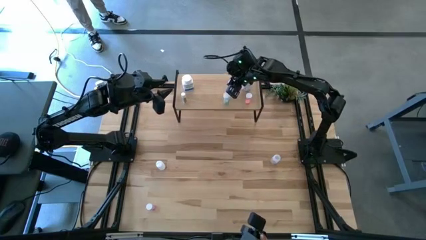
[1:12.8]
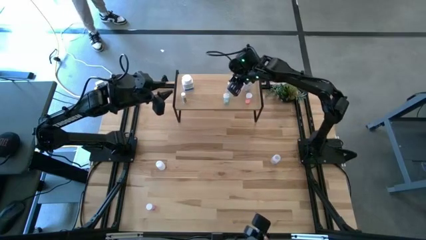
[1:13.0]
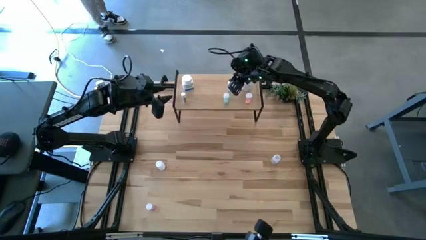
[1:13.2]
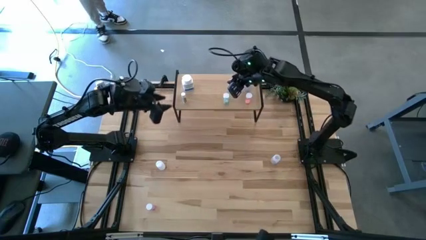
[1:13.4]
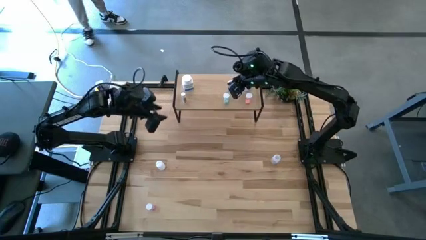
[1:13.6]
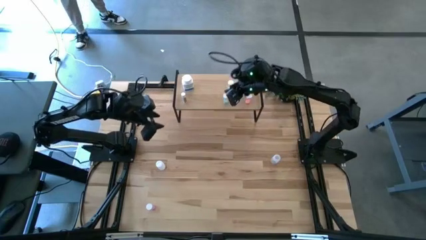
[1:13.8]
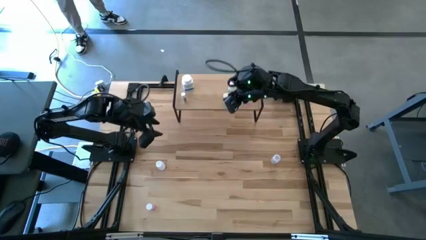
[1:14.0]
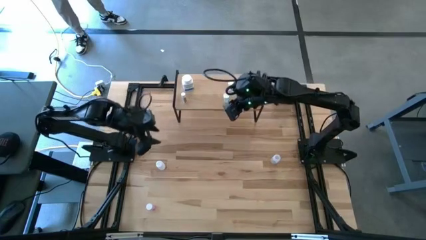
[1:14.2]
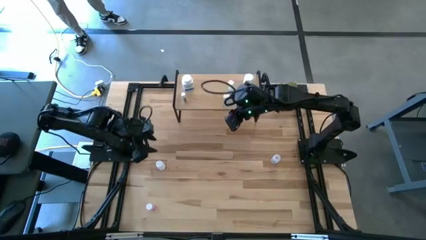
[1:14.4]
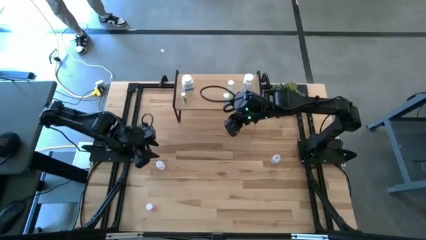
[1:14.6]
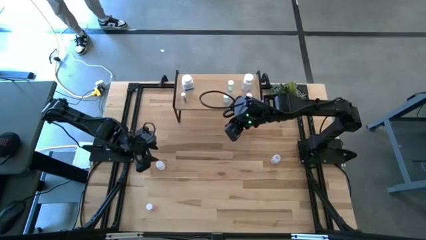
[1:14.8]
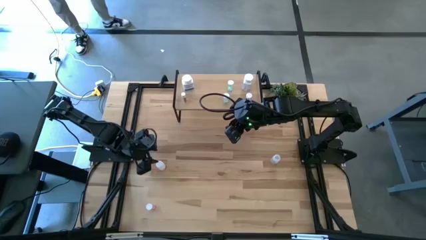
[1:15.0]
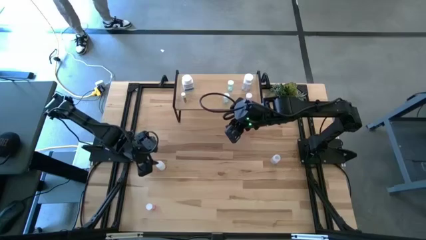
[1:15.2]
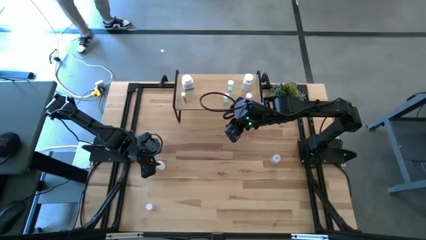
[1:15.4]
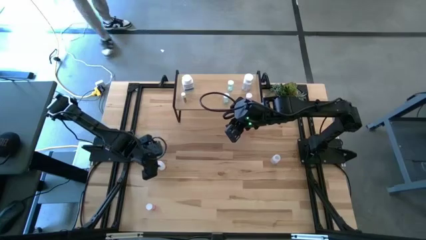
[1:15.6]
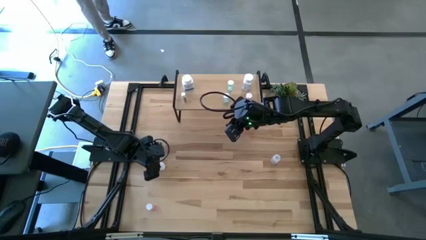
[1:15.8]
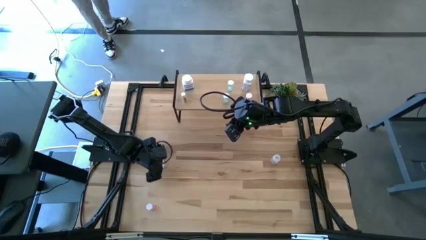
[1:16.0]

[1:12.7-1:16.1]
Task: Pick and place medicine bottles onto shelf by color
Put the white pill bottle on the shelf

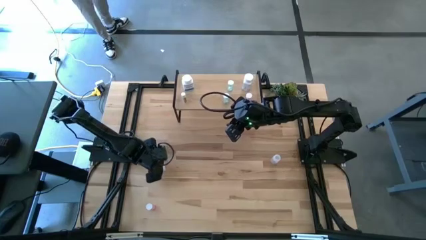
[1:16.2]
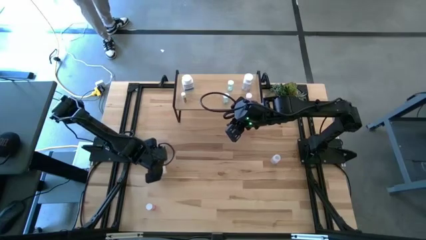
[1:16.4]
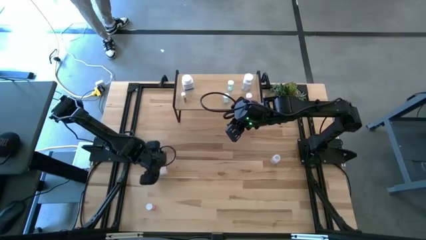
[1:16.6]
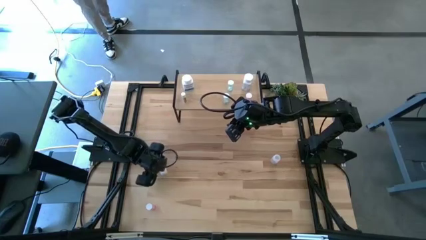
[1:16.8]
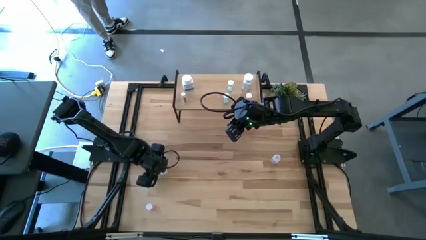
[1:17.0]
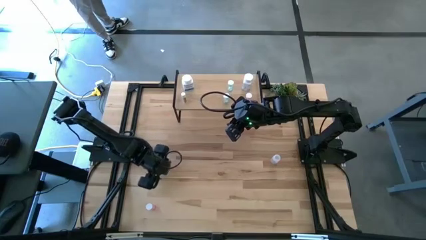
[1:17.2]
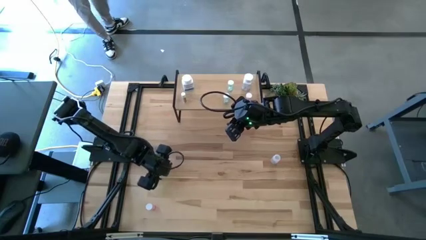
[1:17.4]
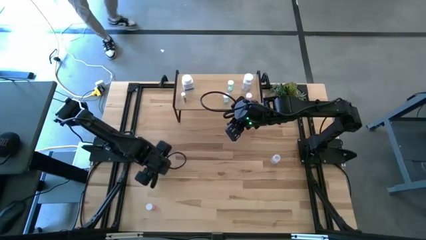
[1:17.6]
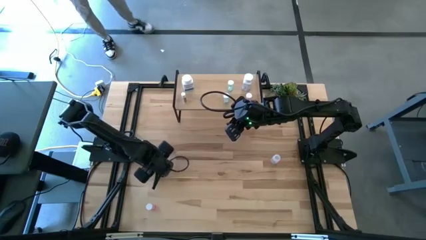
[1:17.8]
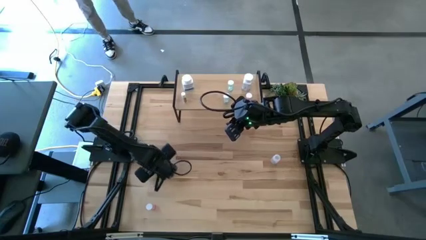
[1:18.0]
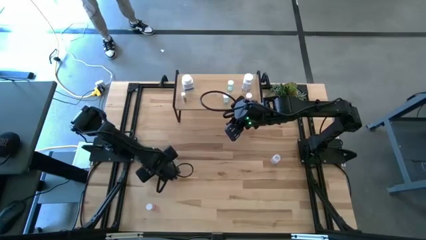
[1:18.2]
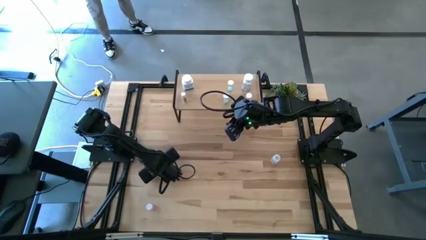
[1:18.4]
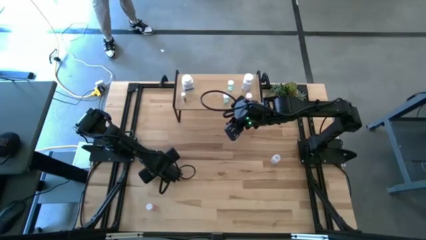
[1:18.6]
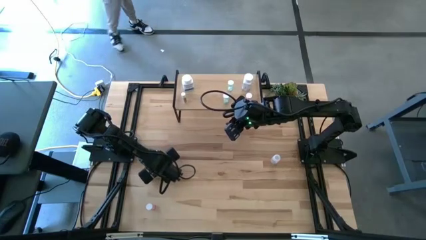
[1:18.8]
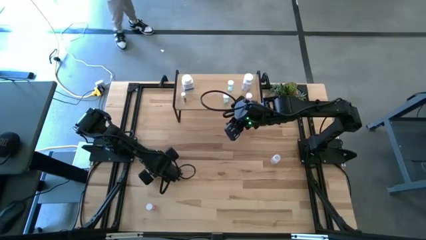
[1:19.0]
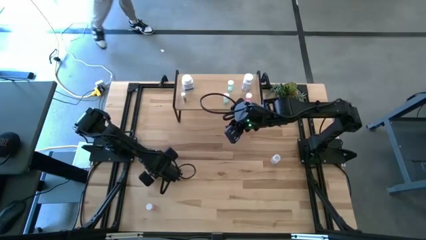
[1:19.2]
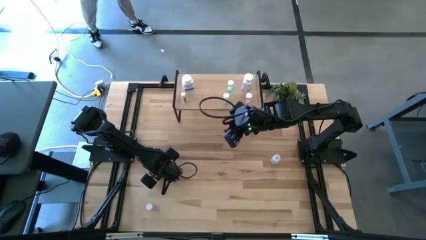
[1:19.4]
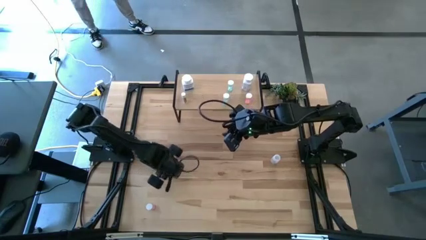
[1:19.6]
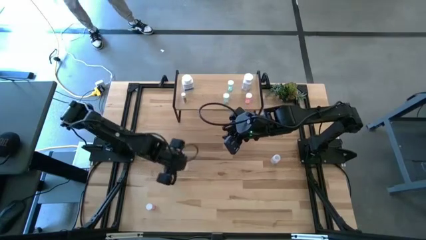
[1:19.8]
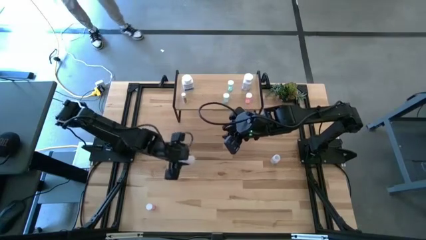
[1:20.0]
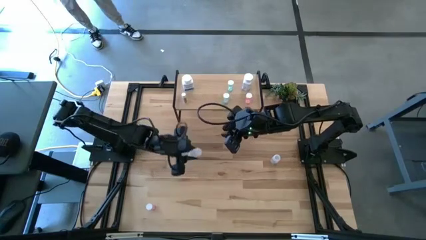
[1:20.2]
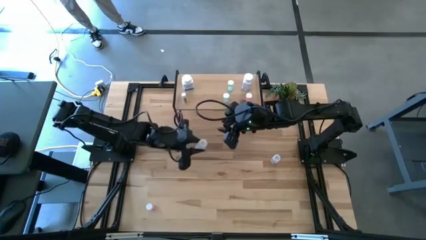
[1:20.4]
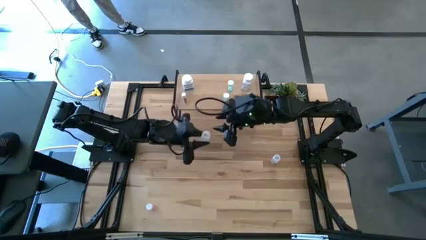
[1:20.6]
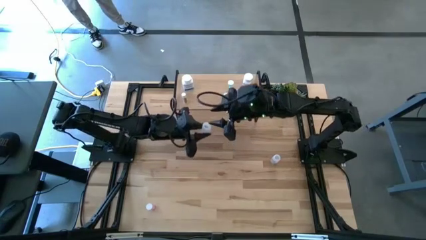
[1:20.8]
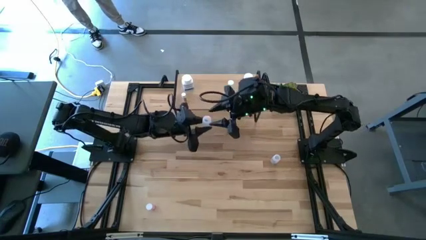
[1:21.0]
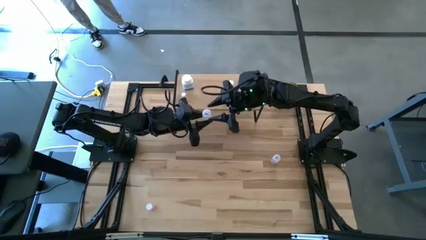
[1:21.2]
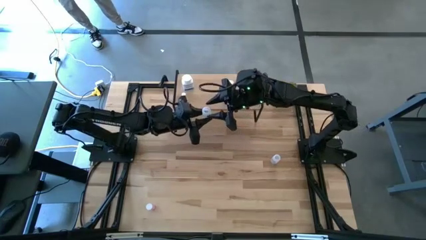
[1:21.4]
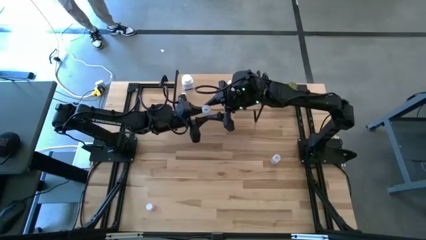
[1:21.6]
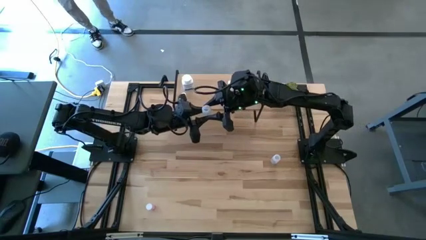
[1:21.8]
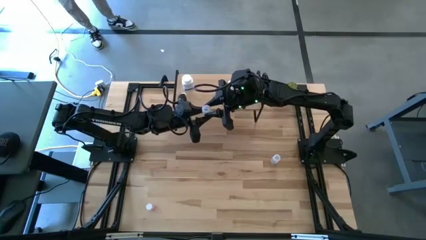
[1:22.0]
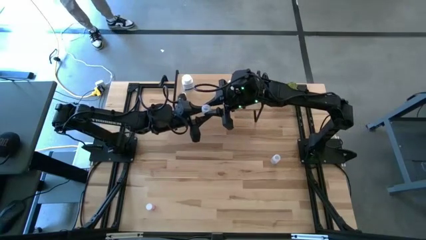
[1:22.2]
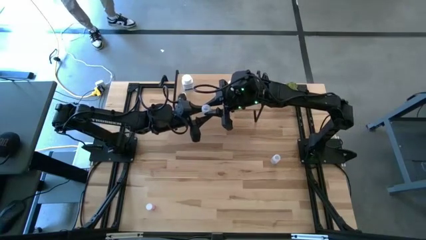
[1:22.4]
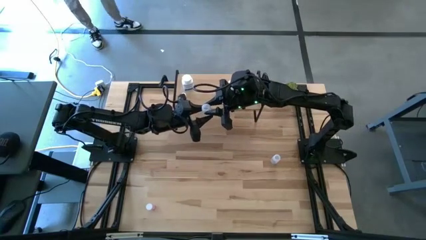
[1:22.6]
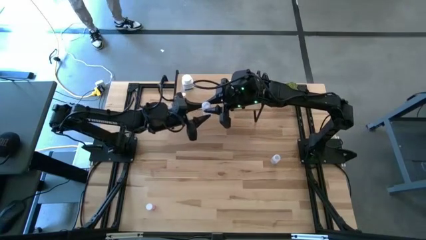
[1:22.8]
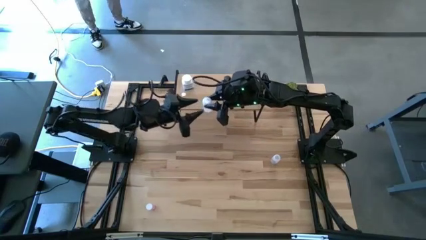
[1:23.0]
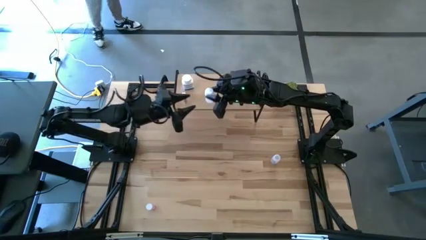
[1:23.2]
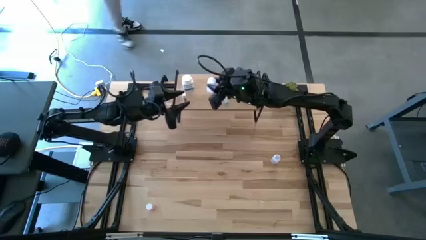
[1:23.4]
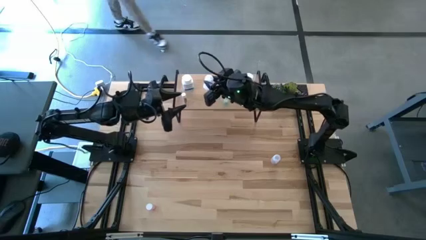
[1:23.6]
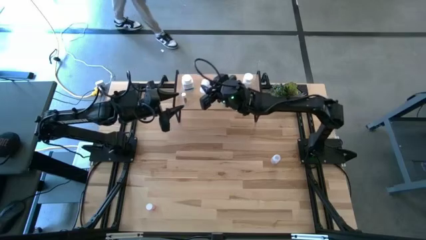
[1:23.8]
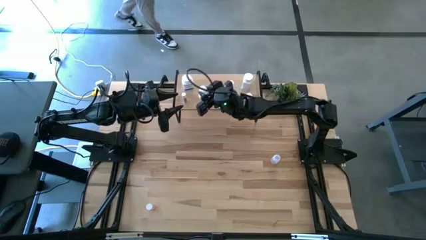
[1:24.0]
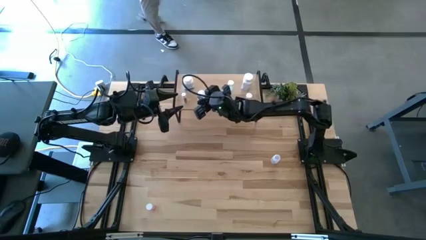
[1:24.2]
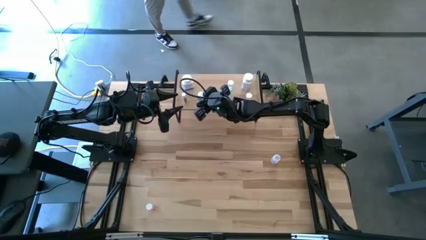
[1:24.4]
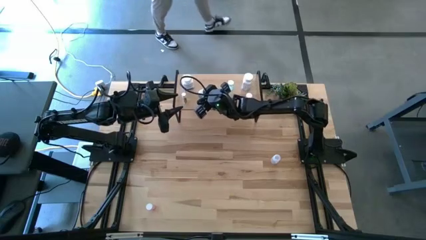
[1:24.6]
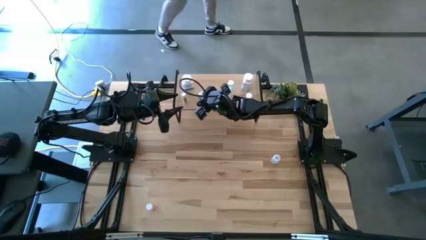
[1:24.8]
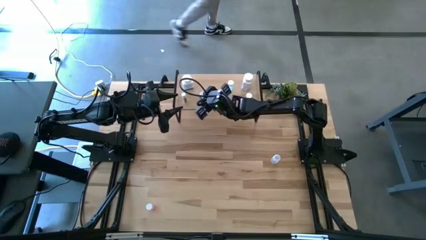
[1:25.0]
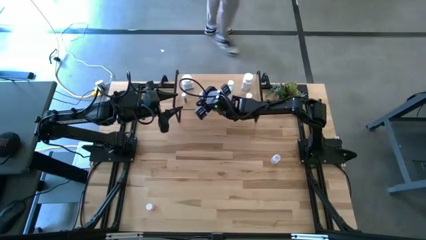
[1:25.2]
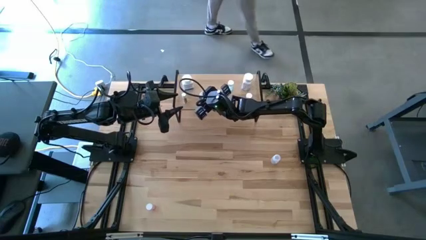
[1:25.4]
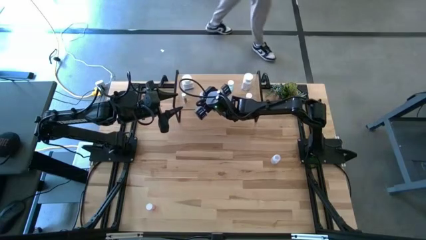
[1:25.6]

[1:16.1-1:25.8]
Put the white pill bottle on the shelf
